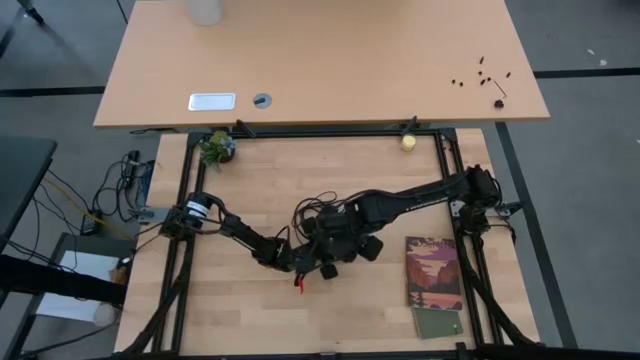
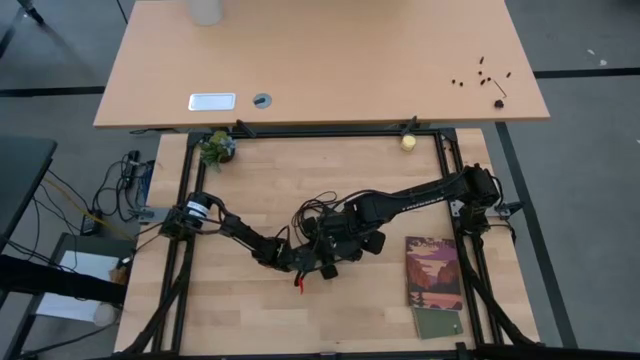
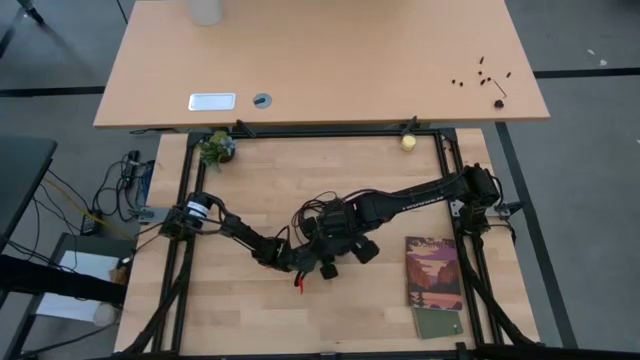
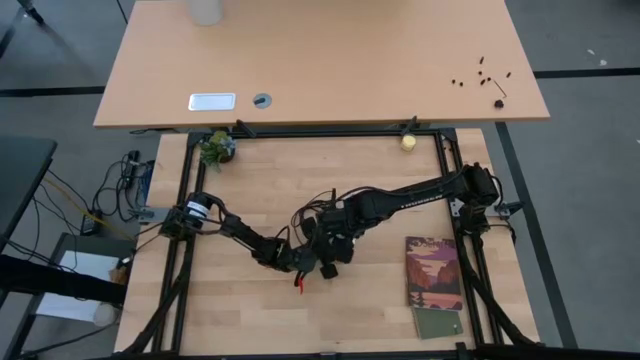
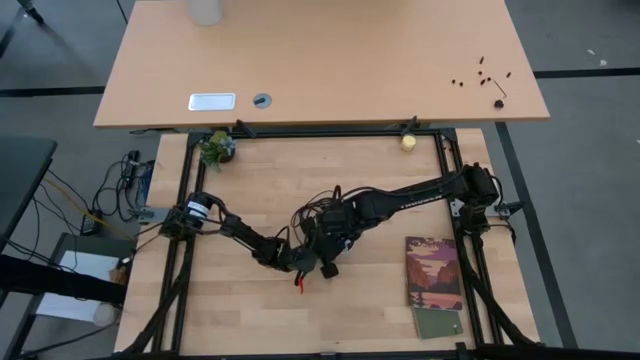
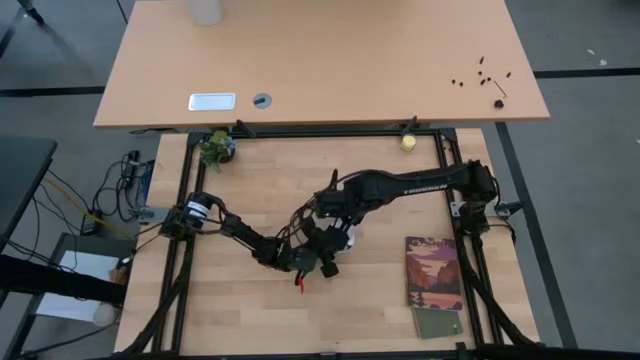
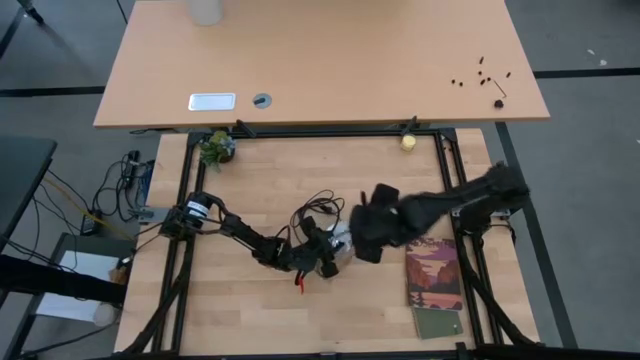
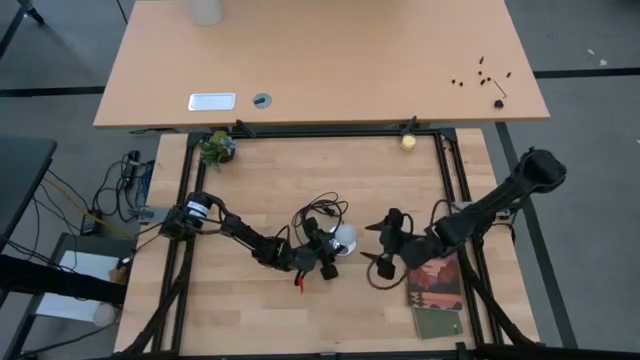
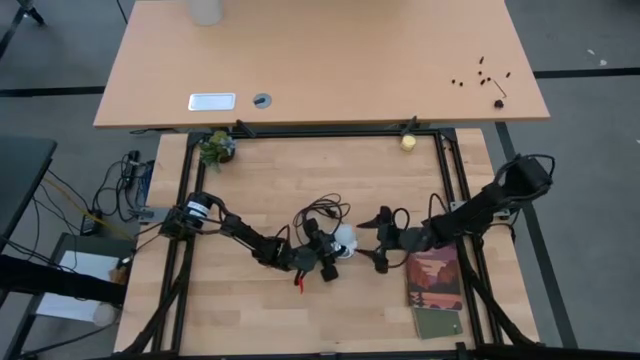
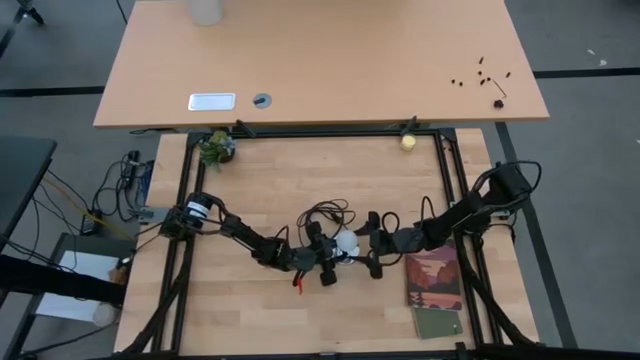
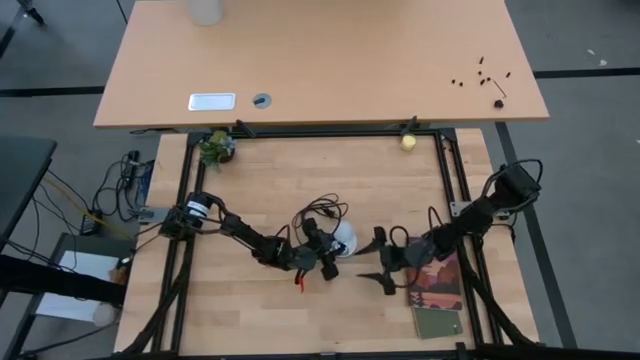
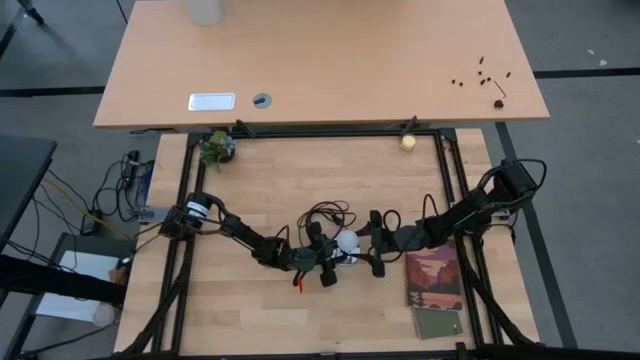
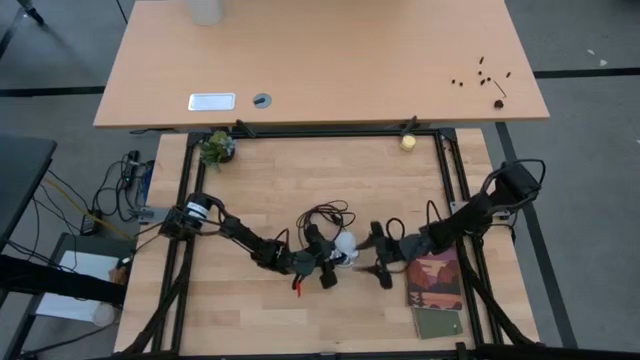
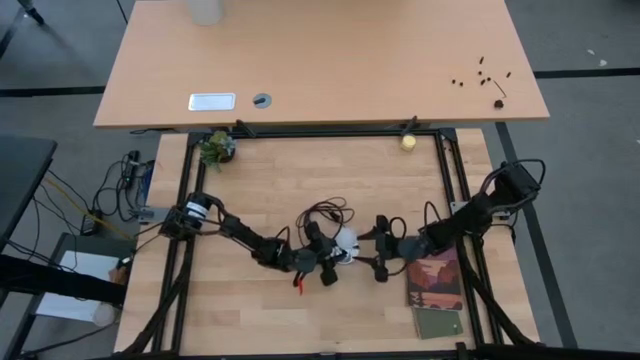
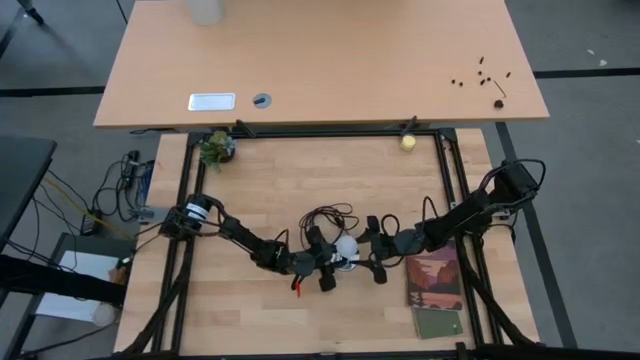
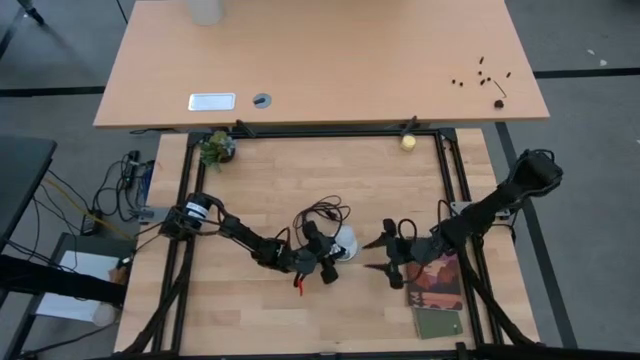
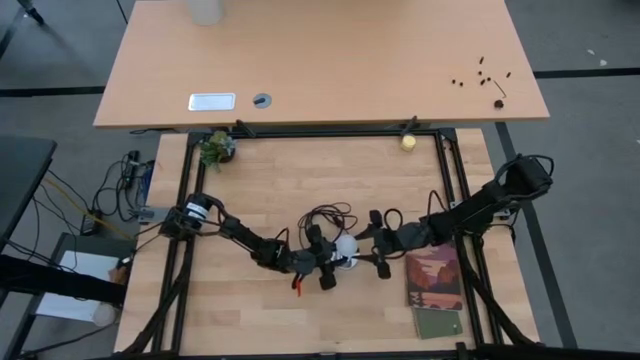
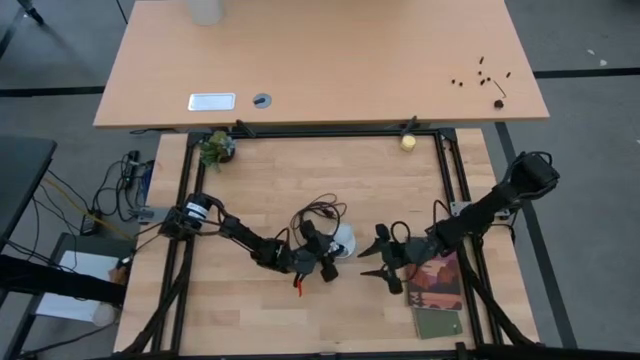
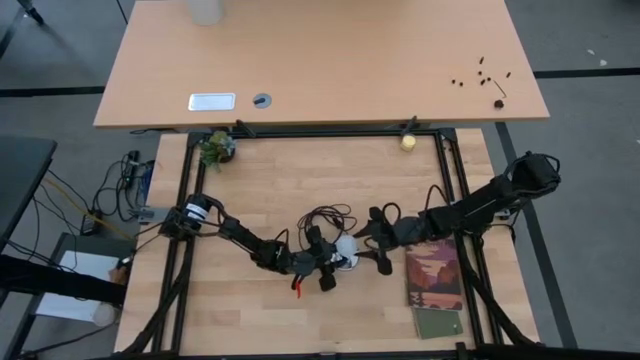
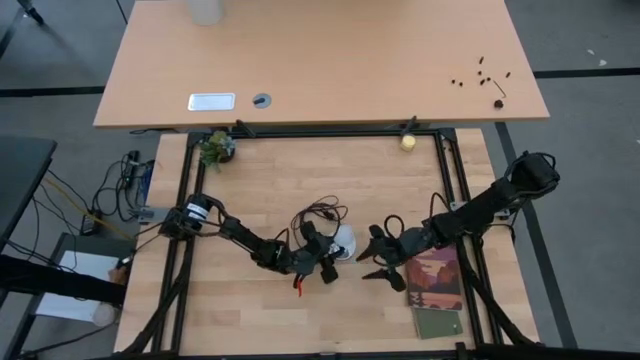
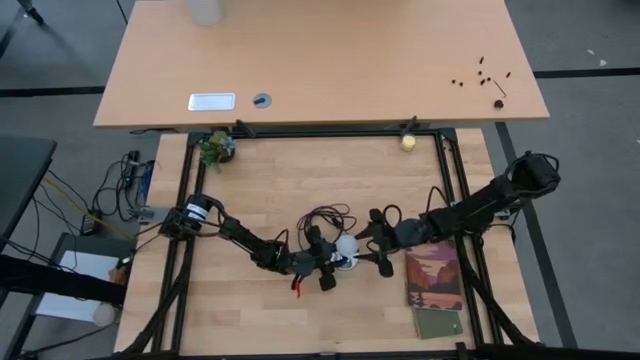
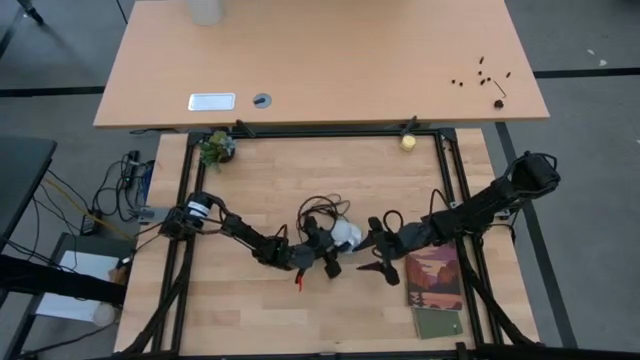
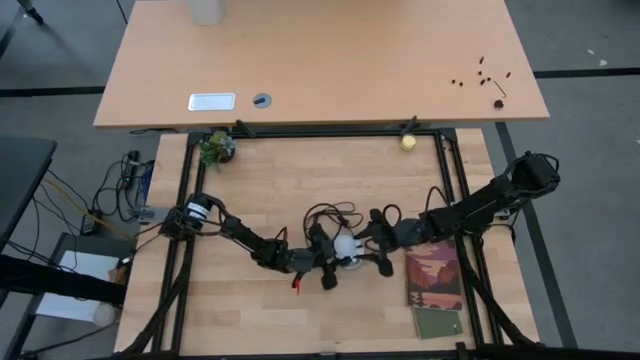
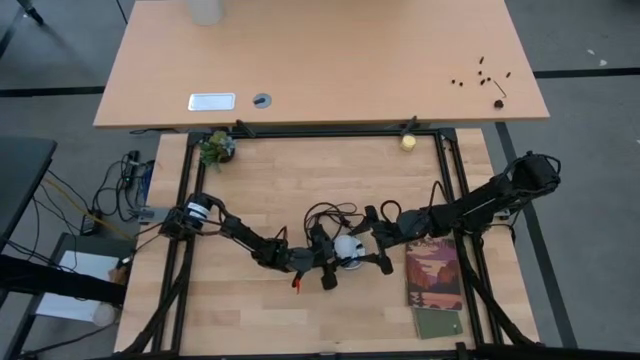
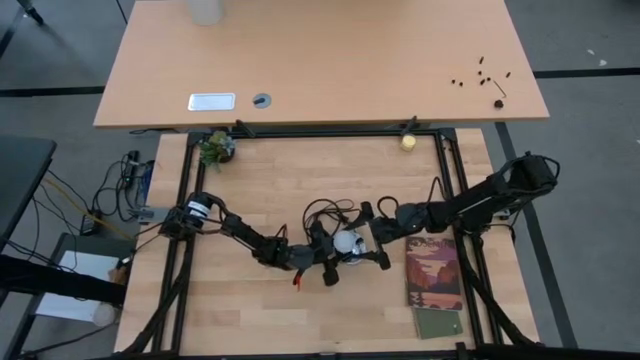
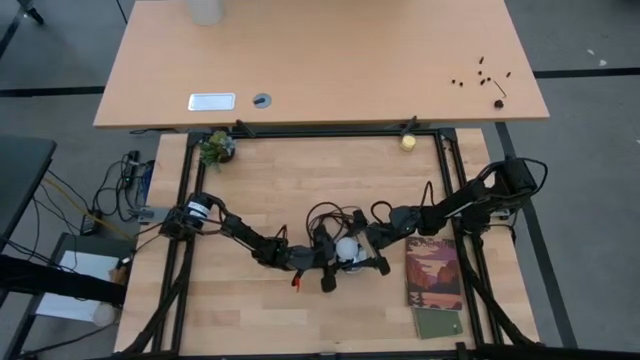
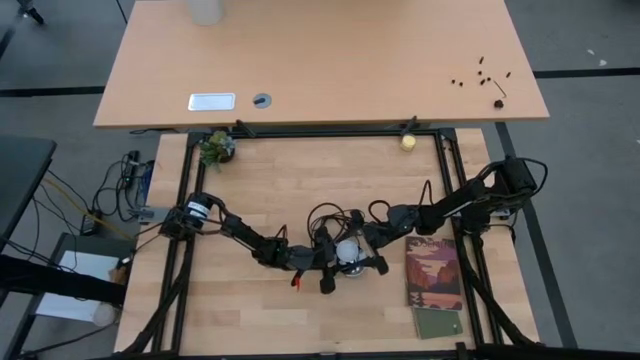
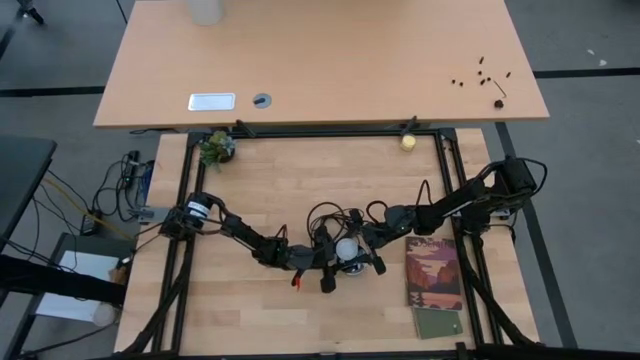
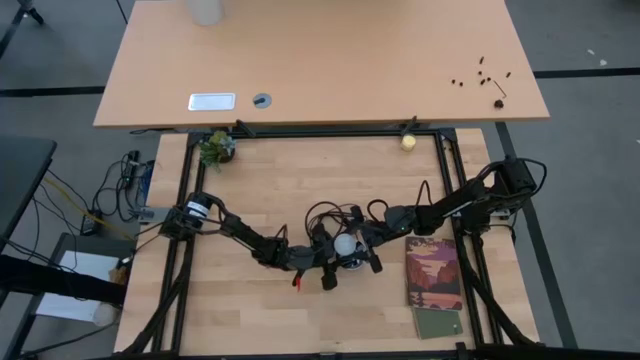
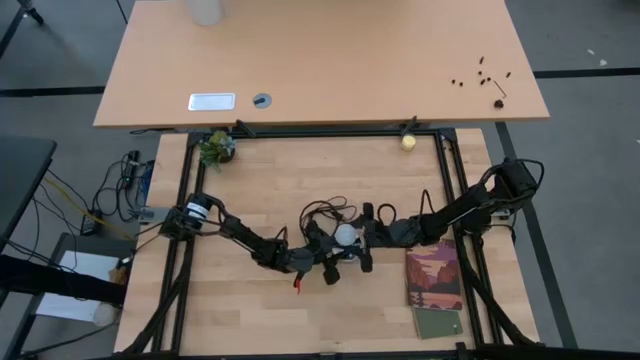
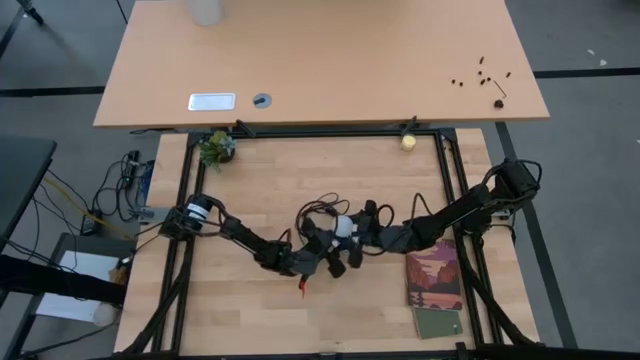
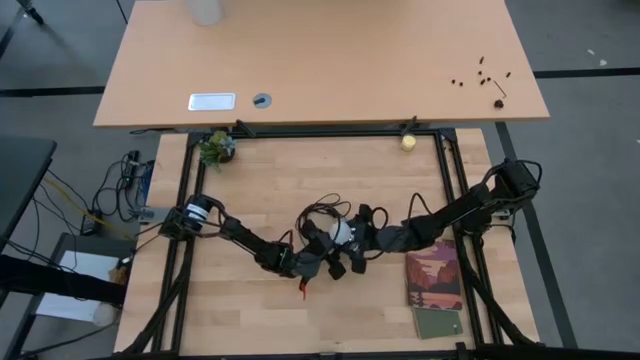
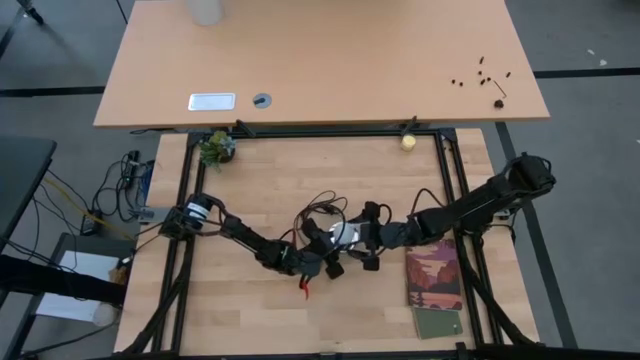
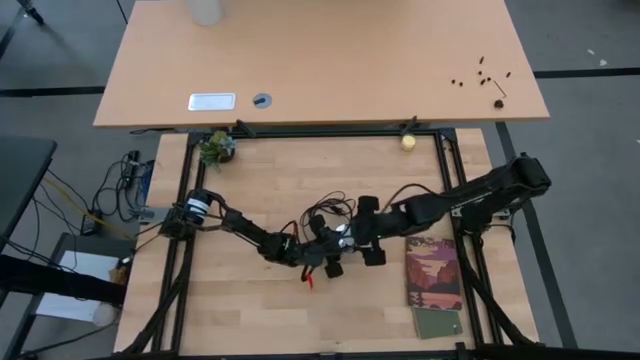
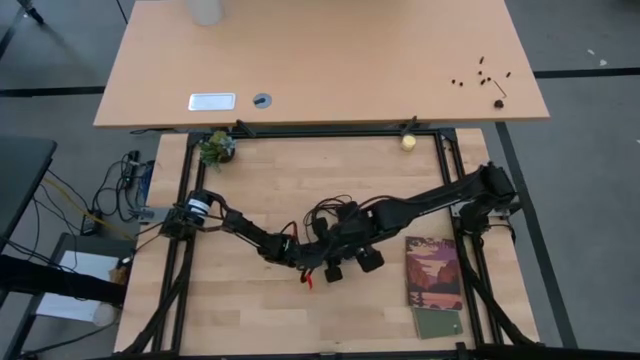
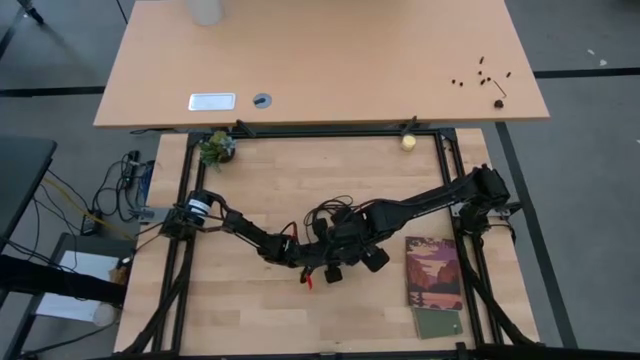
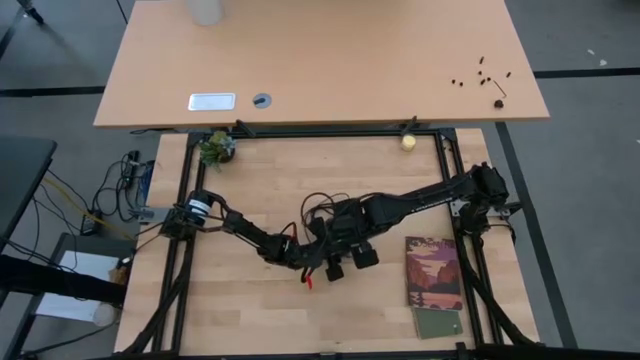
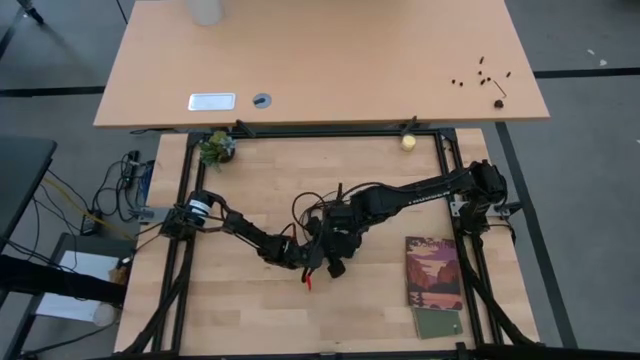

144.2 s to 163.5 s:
Task: Screw lightbulb
Insert the white lightbulb into the silver lamp

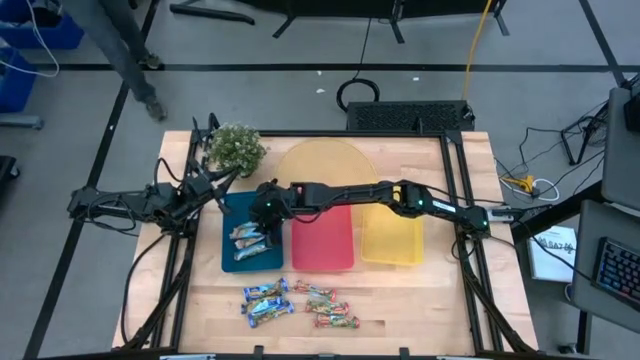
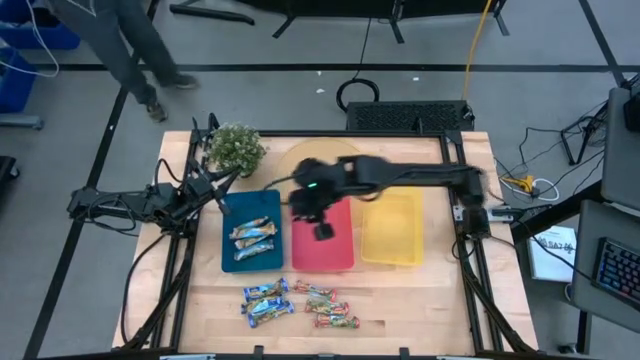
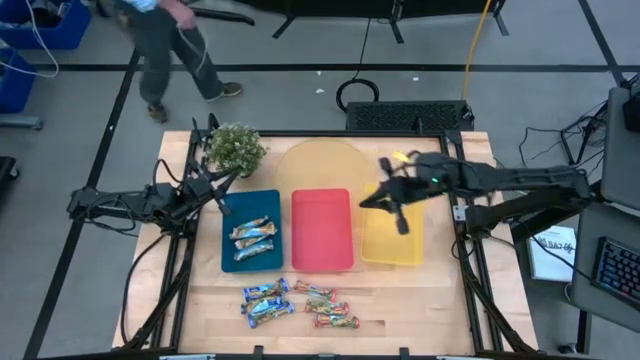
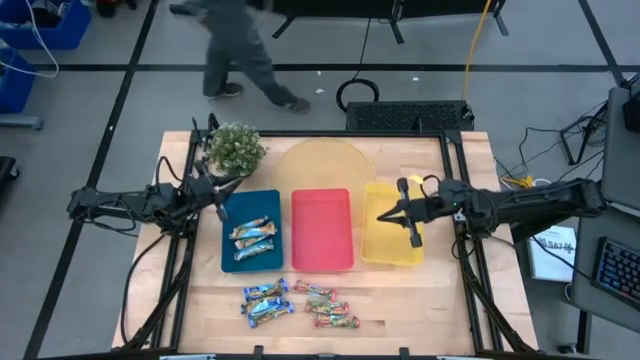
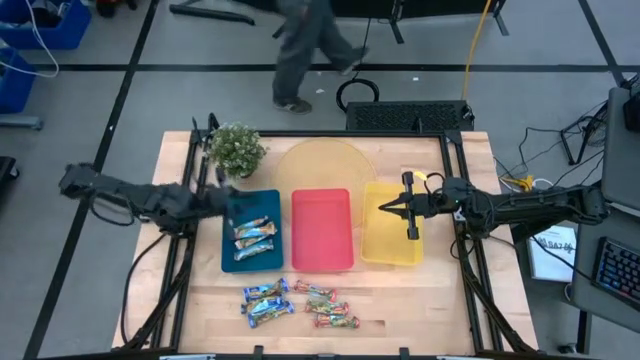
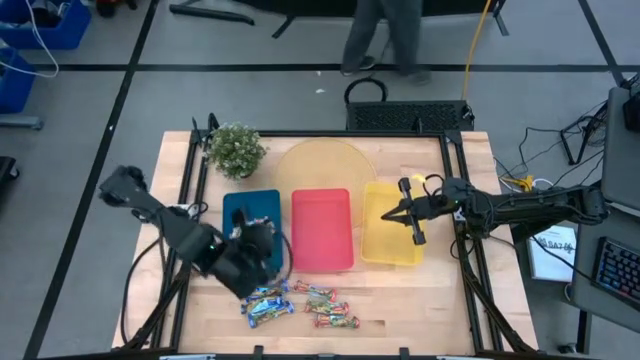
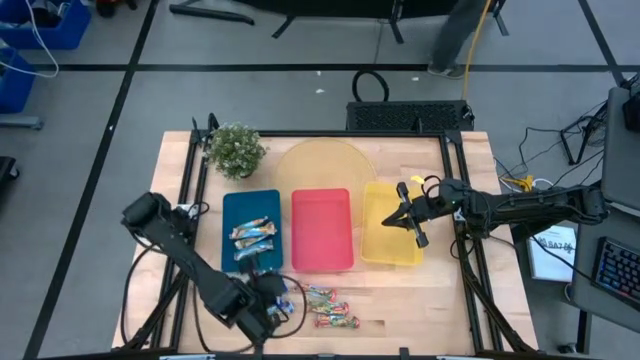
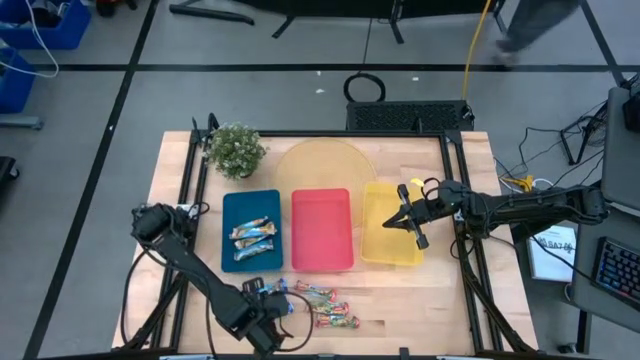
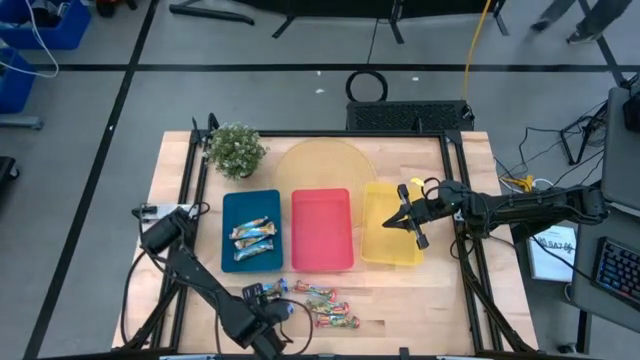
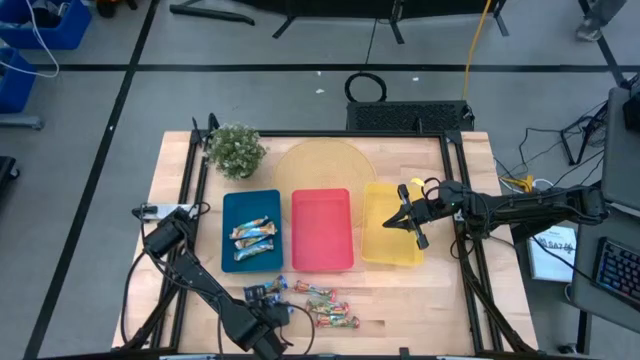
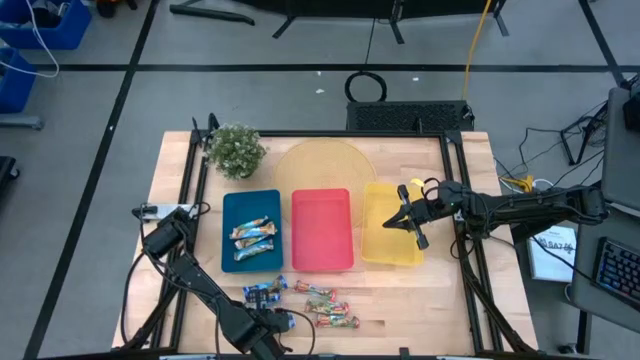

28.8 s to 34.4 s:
Task: Pick and place Granola Bars by type
Put the blue granola bar into the pink bin
